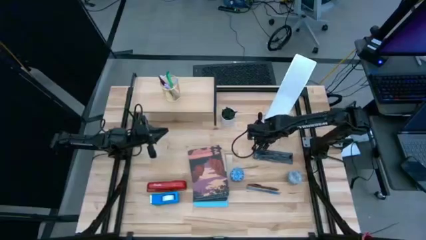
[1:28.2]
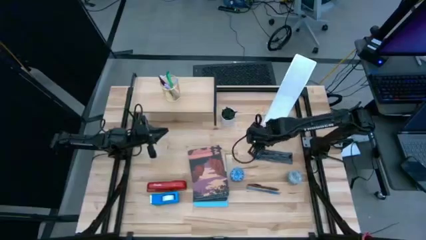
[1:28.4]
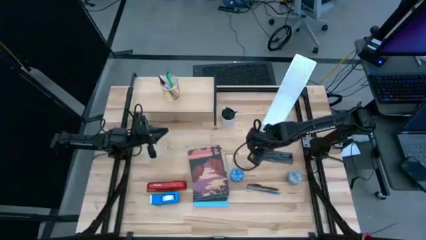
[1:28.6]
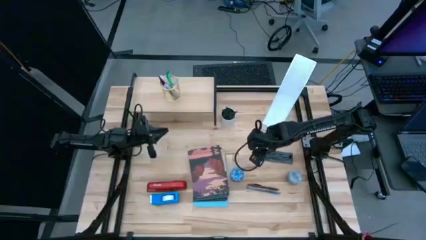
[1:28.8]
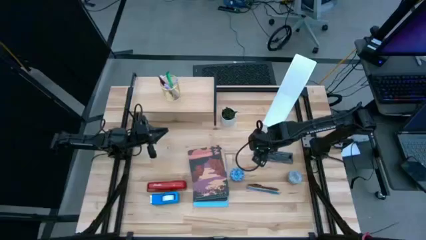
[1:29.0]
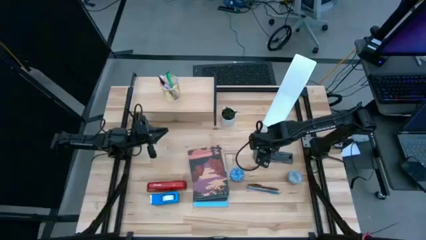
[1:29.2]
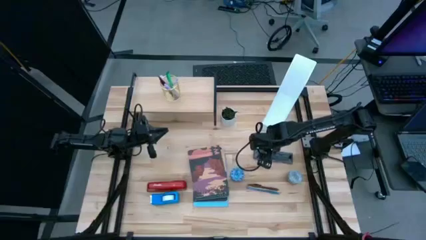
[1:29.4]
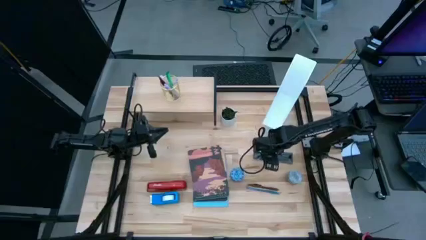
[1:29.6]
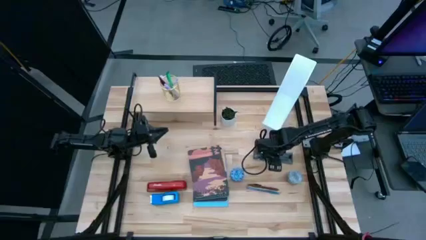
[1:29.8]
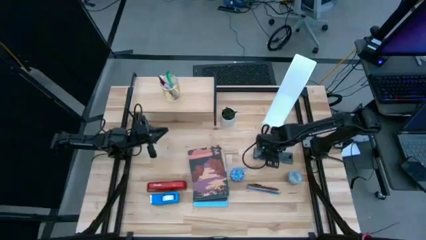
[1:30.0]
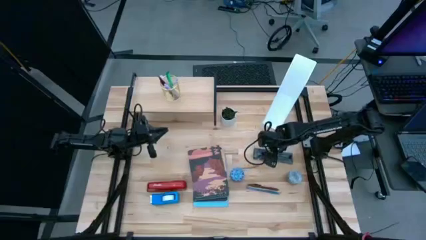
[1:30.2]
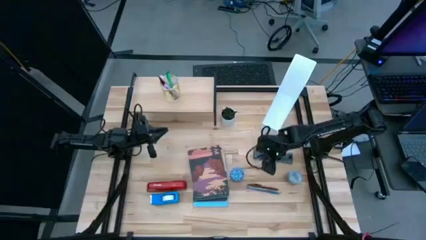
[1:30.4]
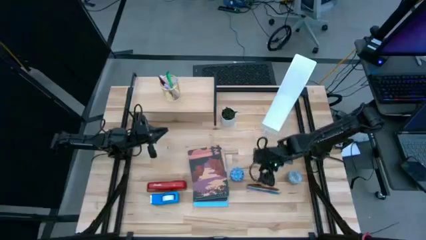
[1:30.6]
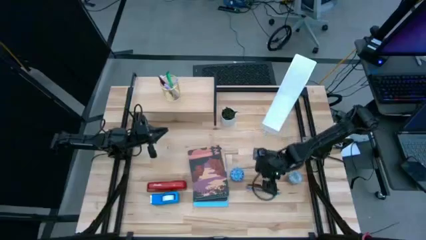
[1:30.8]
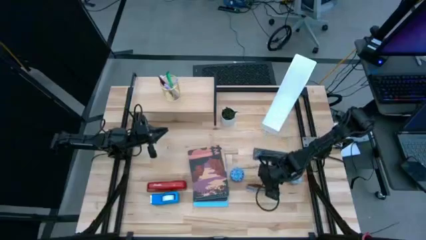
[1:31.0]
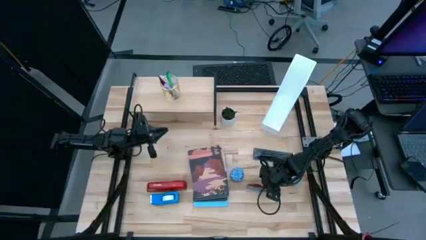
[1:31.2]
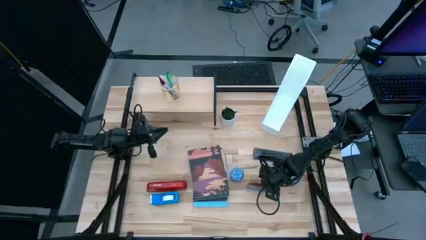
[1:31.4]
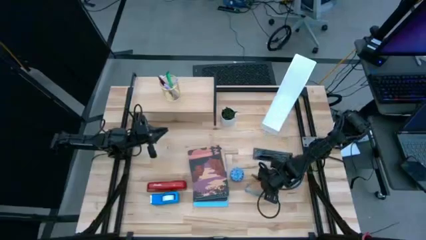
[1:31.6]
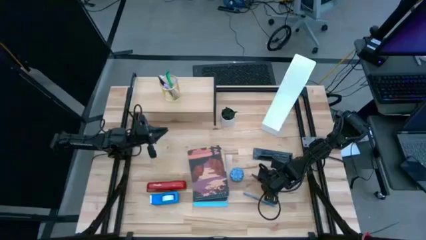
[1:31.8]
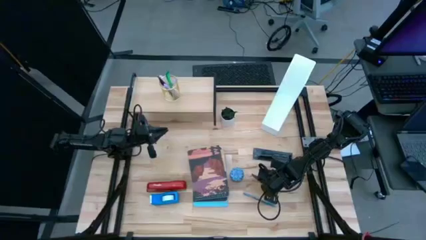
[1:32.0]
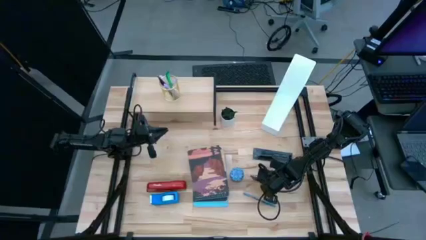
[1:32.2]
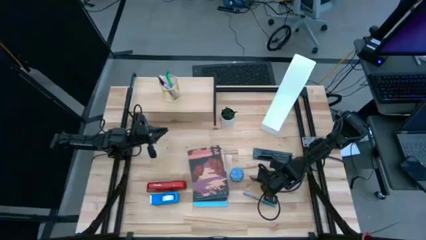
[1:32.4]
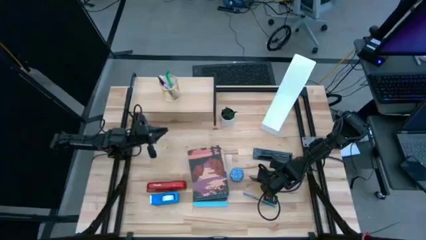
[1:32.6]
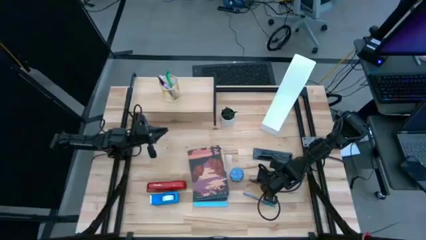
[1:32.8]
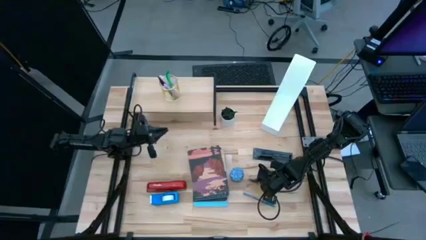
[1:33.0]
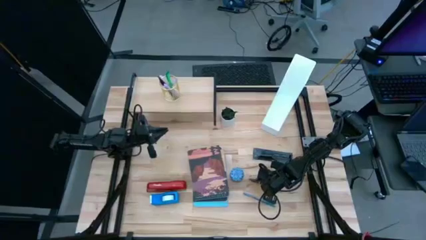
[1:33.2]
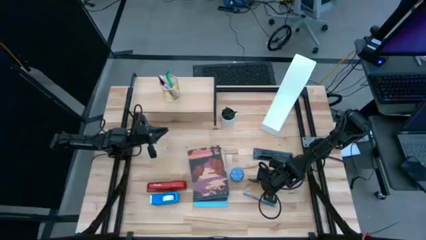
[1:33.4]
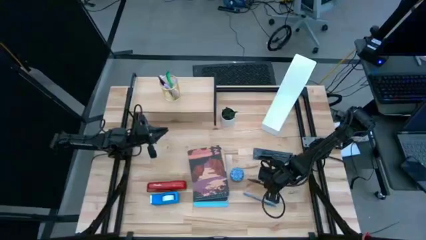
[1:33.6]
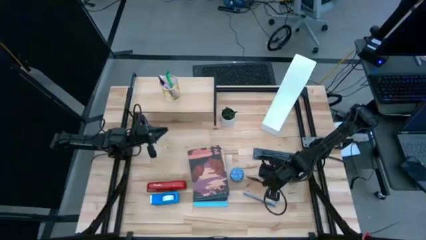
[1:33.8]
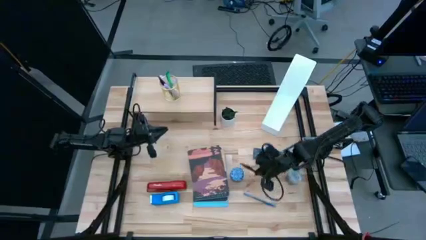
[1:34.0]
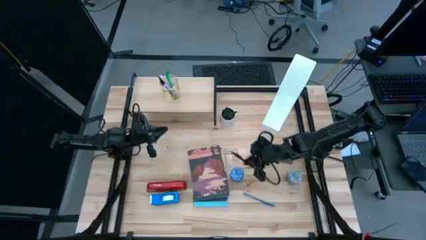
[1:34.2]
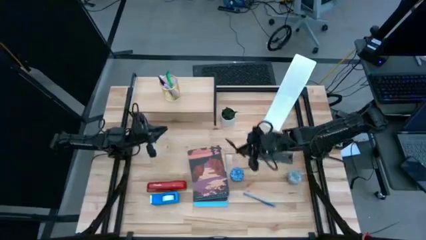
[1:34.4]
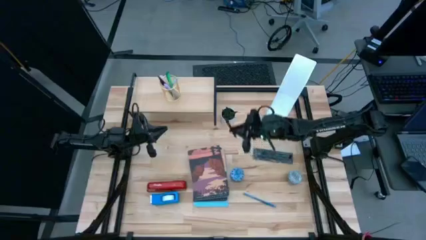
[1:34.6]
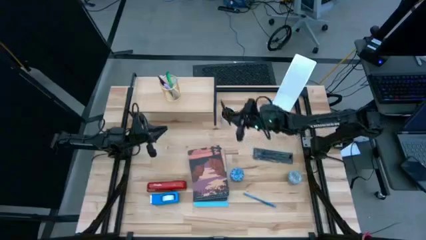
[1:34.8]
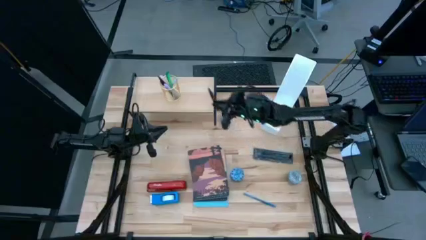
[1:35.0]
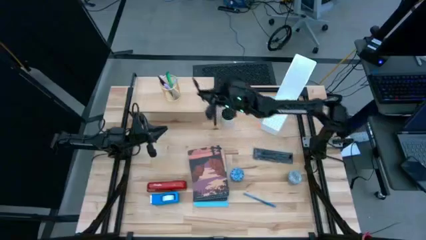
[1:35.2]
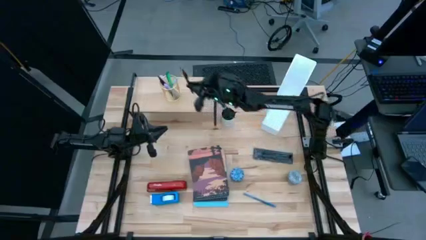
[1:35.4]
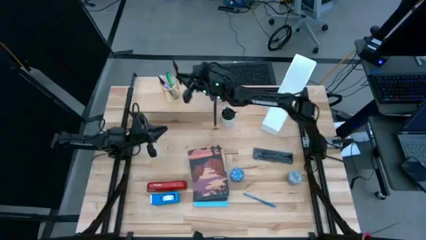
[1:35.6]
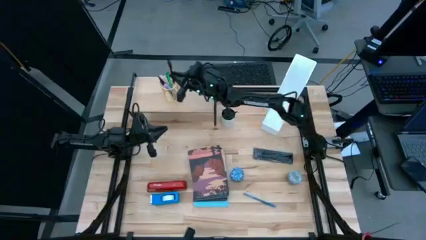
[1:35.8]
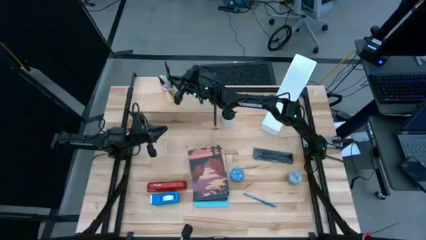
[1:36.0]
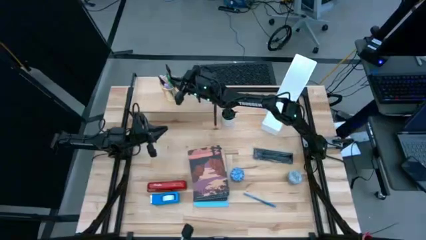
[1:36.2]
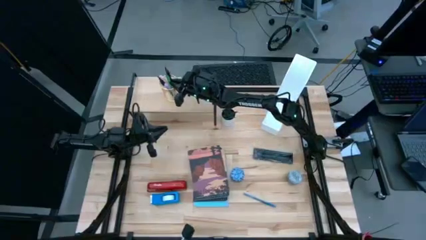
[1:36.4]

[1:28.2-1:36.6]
Task: Stock shelves
Put the brown pen into the gold pen holder on the shelf

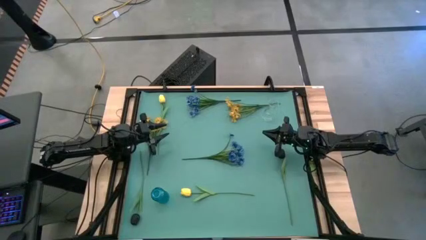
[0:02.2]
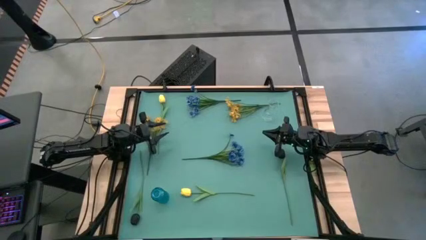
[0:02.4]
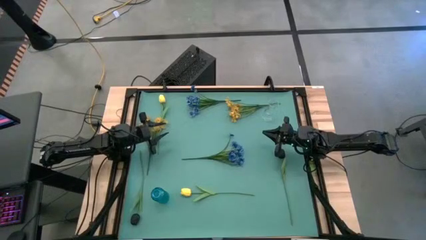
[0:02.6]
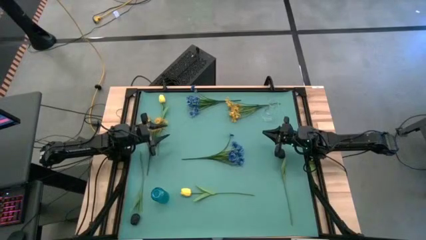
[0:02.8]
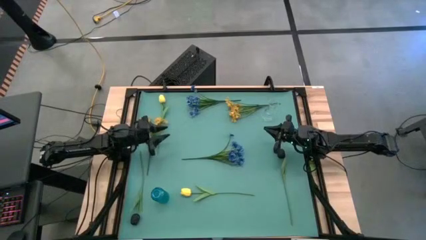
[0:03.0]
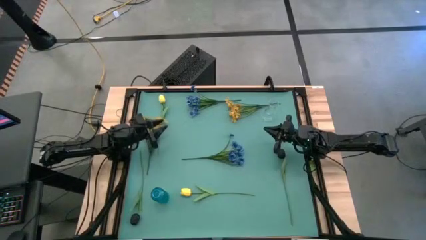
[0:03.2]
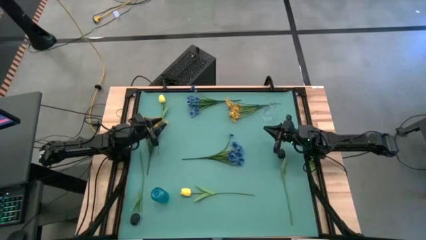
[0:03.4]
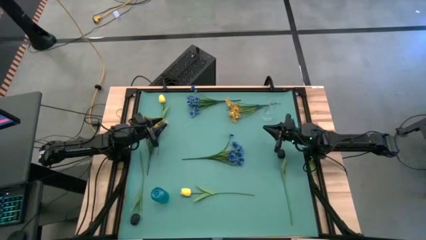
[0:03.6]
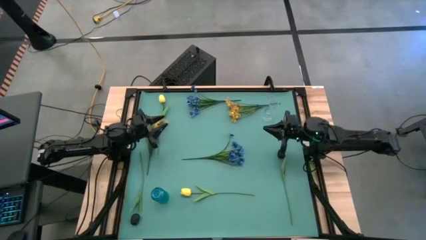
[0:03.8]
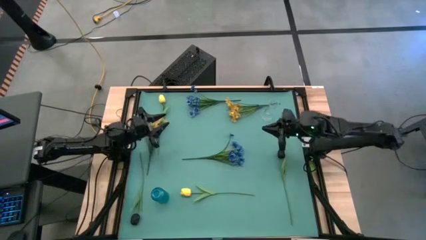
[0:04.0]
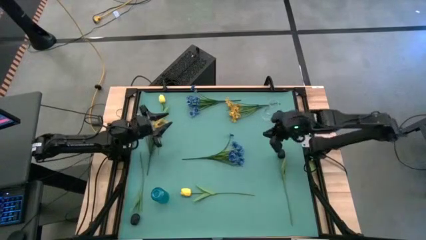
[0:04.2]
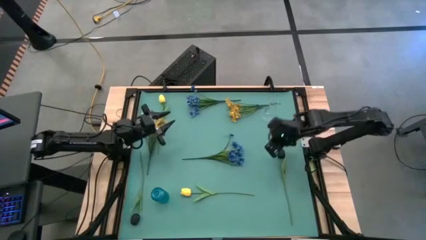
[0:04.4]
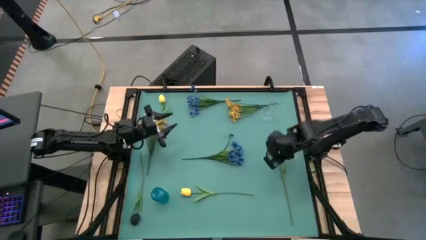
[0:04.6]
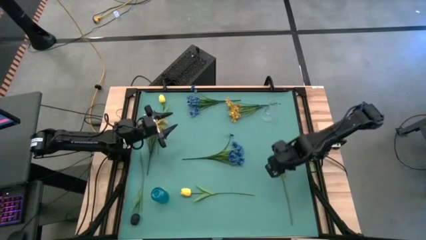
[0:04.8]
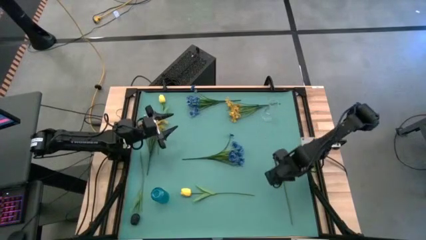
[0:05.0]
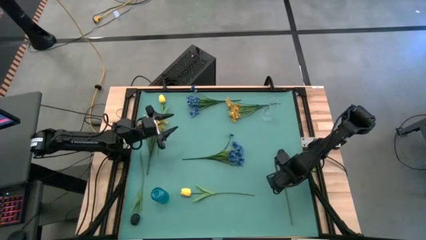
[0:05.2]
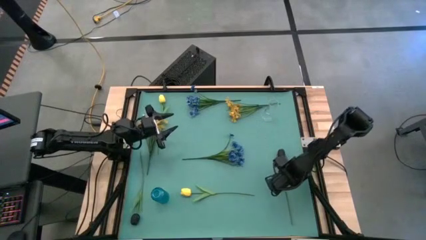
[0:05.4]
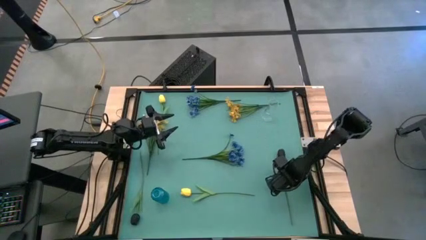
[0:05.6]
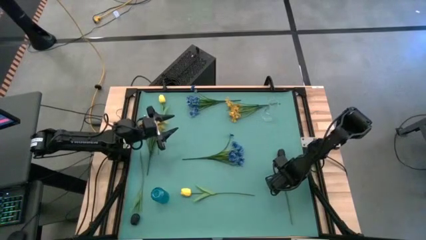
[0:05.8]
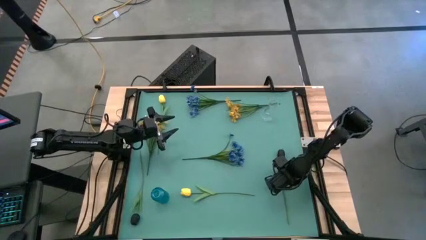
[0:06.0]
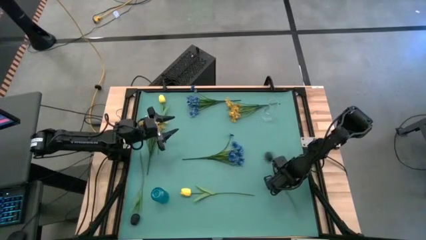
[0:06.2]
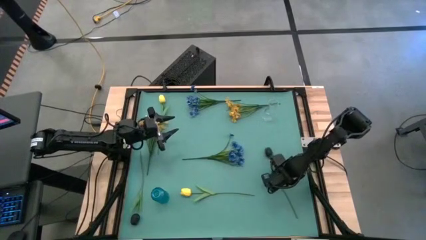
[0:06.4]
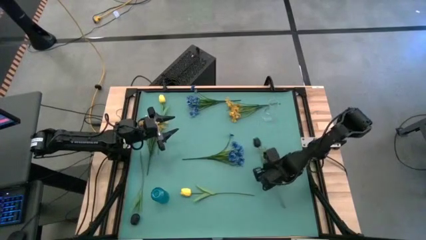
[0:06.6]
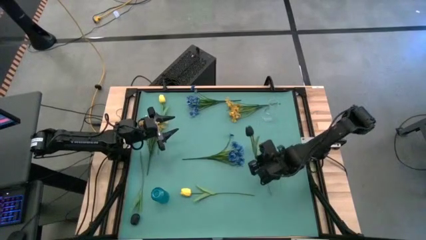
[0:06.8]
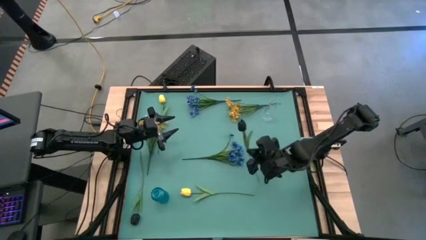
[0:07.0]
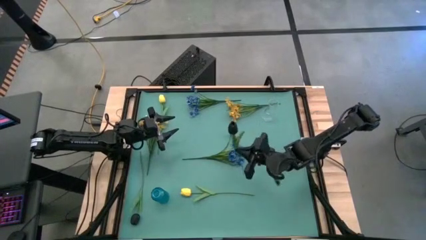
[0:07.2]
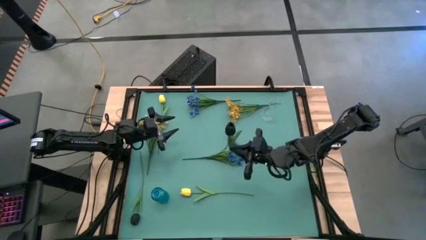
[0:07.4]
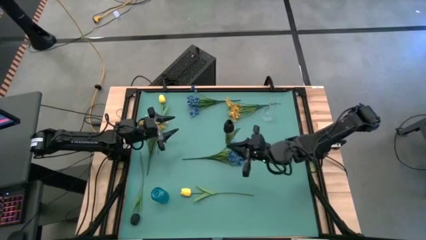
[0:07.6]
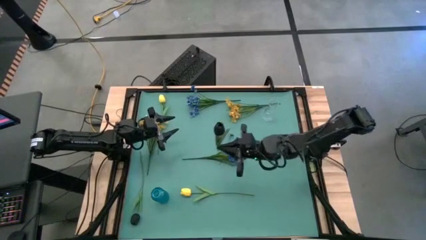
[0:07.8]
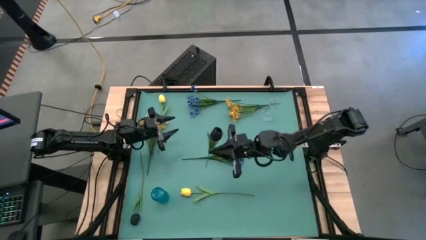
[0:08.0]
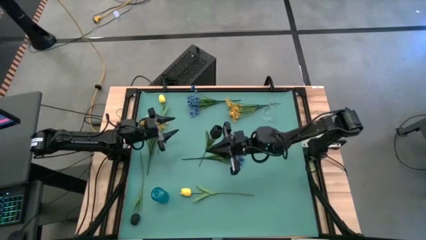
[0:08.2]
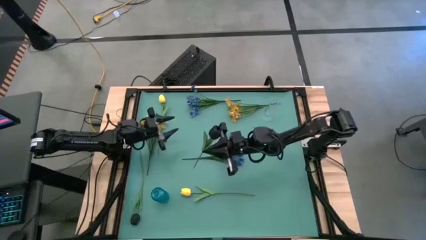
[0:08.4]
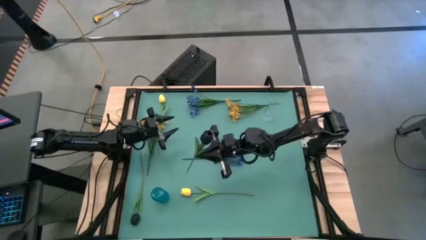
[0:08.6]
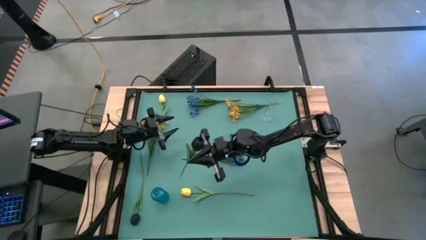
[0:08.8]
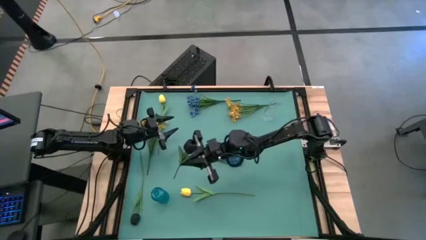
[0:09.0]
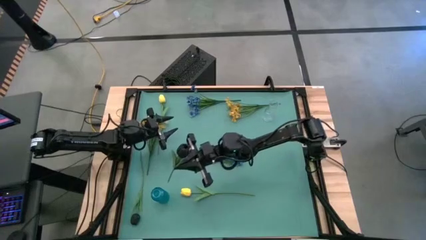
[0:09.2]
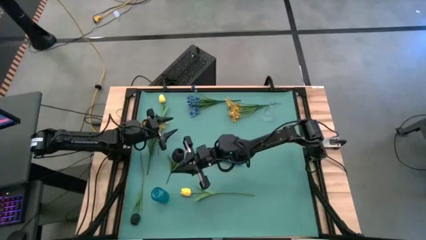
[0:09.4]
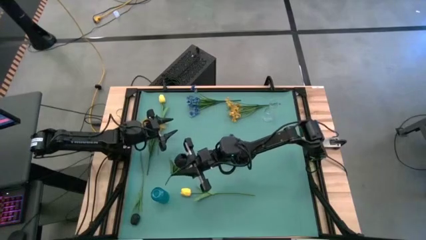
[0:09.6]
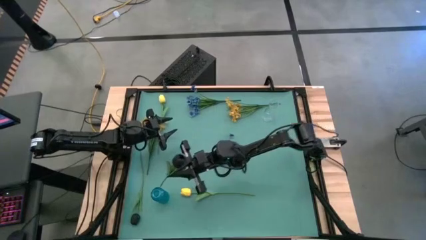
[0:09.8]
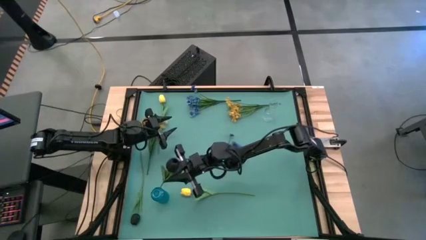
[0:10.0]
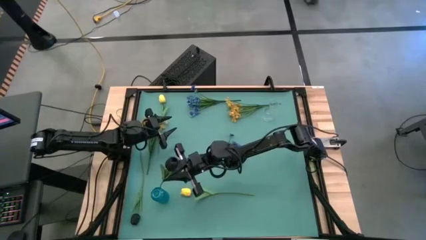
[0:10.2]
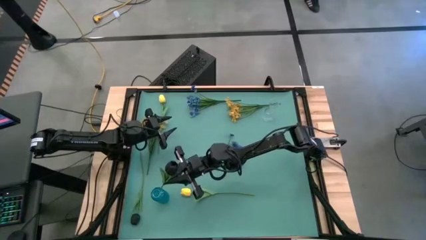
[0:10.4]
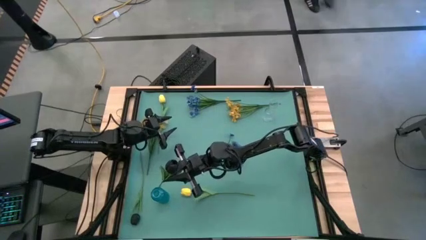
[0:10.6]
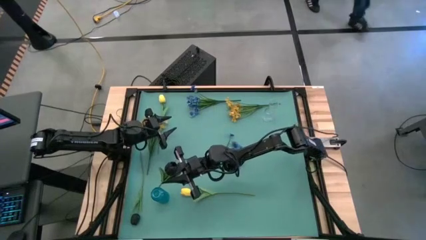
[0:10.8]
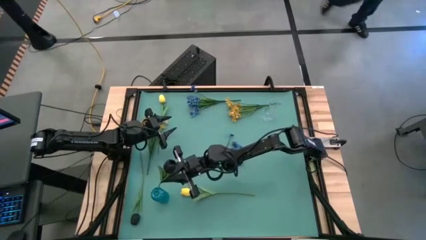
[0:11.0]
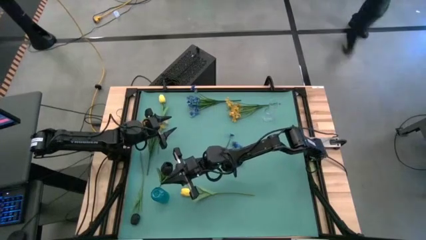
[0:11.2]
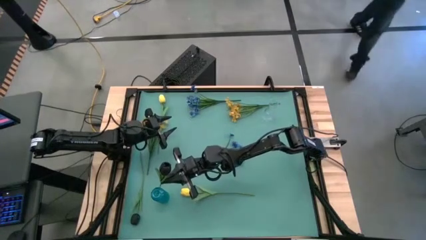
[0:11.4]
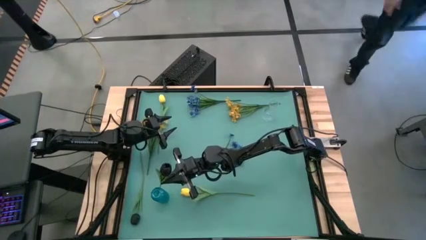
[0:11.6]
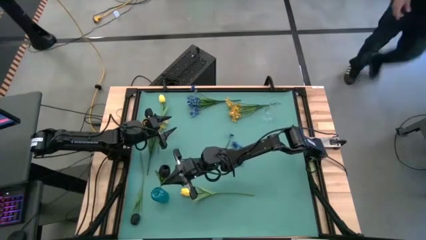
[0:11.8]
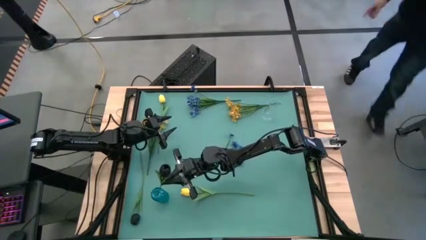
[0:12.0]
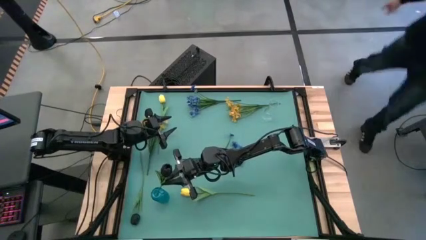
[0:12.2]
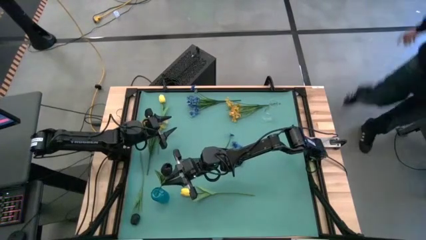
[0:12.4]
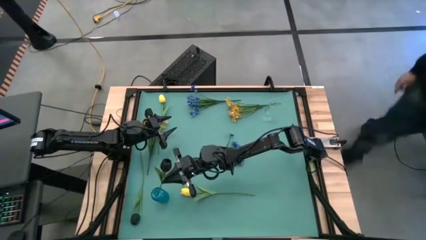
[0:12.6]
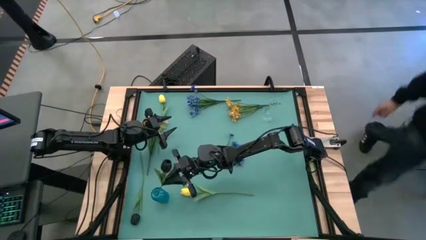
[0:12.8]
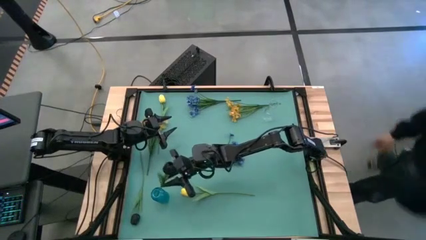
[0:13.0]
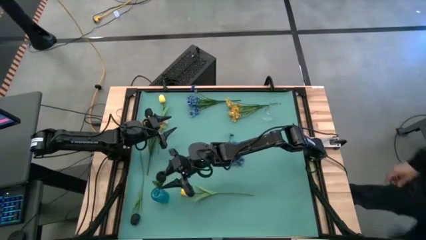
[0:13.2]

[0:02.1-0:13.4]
Task: Sort flowers into vase by color
Put the right black flower into the blue flower vase
